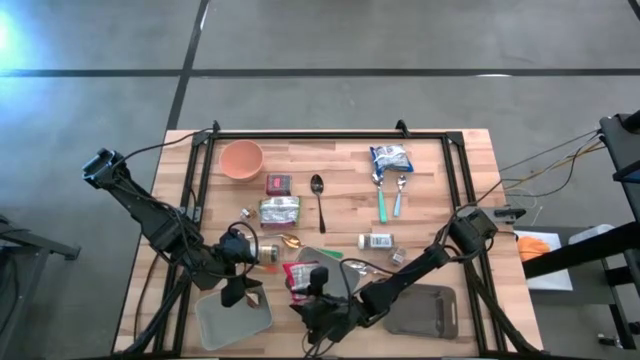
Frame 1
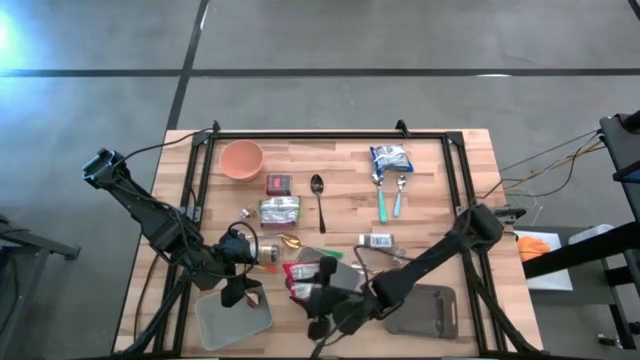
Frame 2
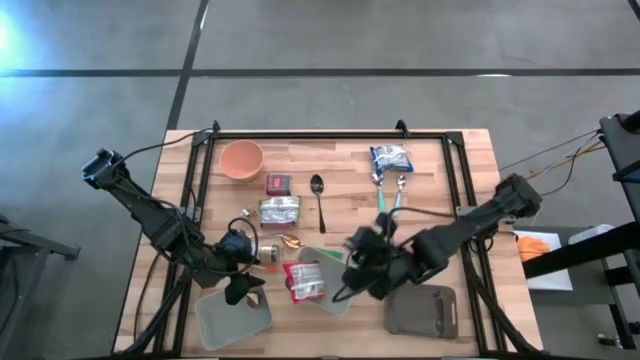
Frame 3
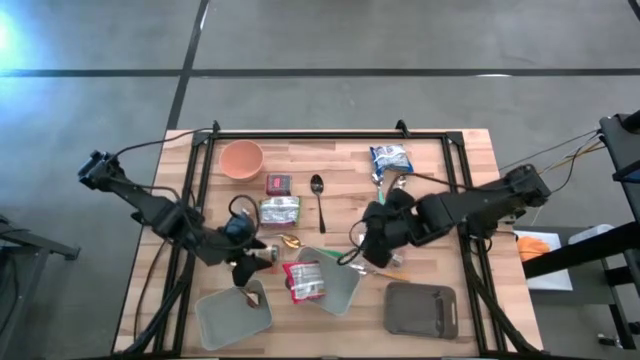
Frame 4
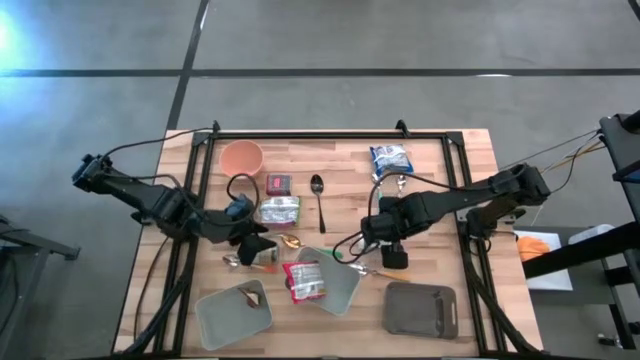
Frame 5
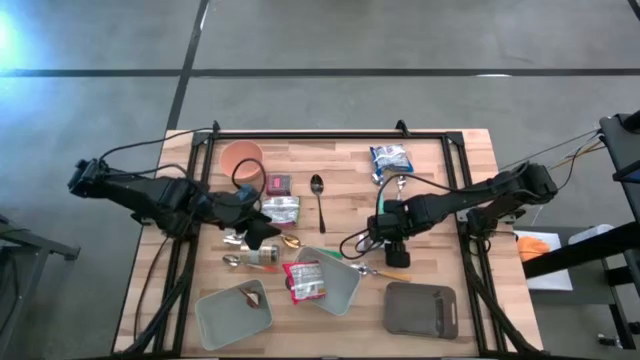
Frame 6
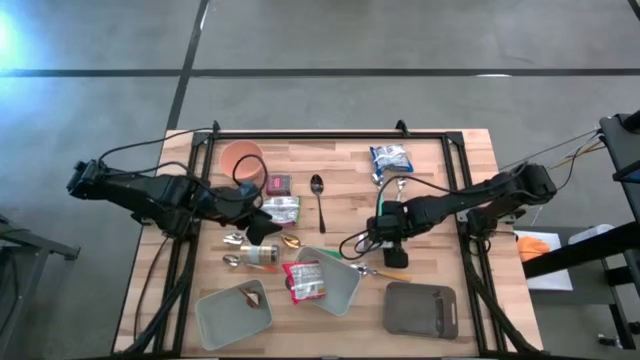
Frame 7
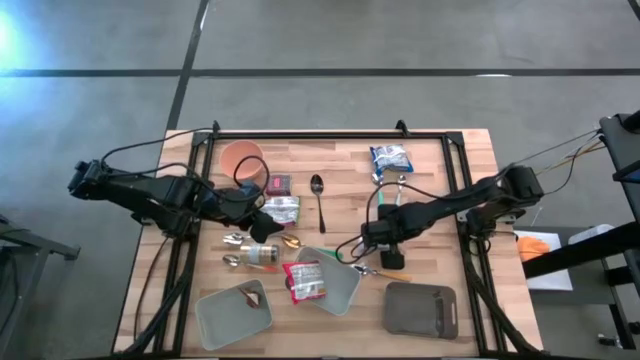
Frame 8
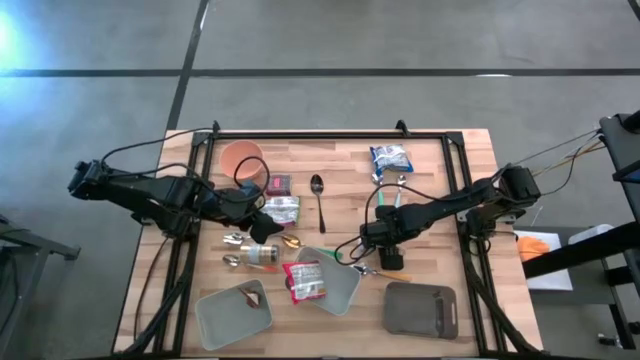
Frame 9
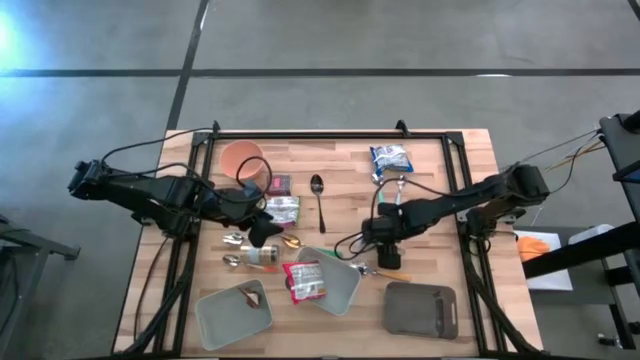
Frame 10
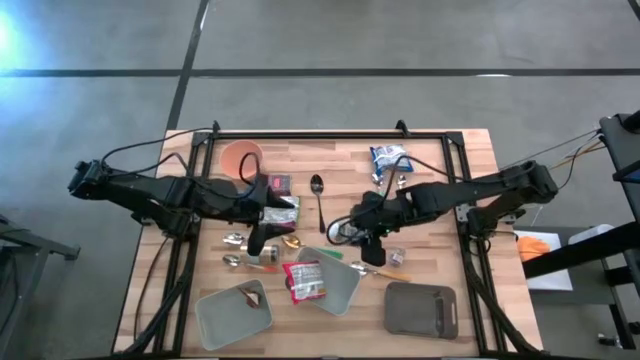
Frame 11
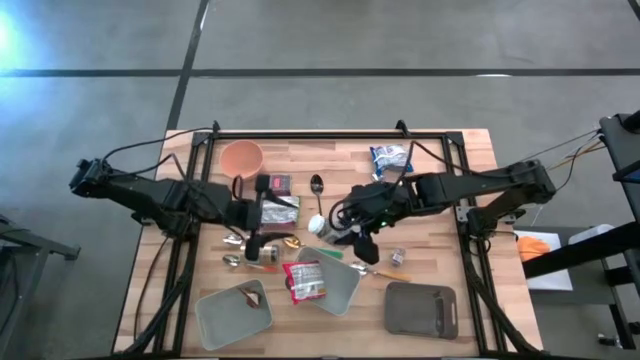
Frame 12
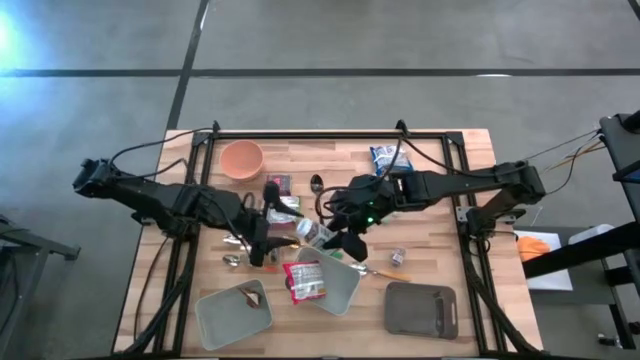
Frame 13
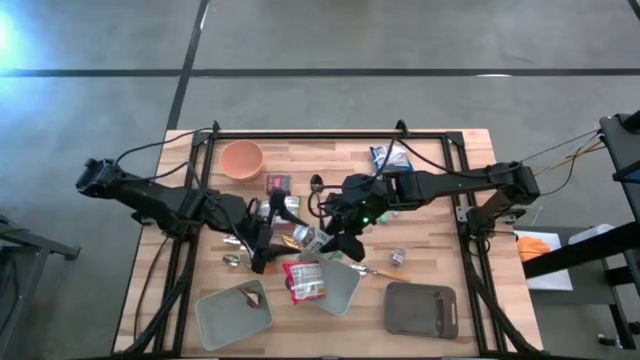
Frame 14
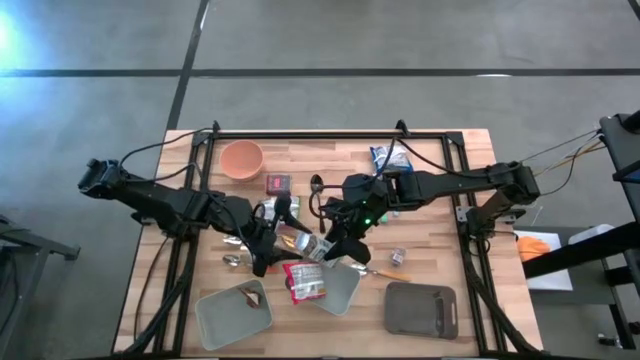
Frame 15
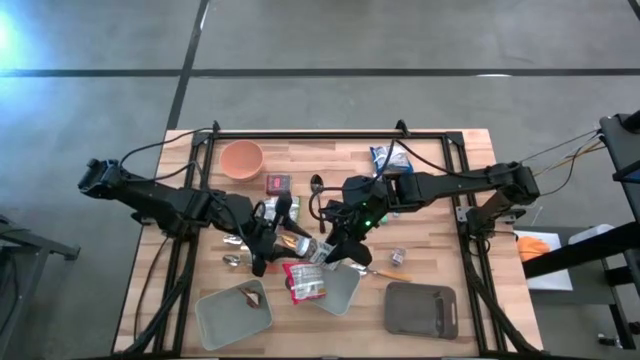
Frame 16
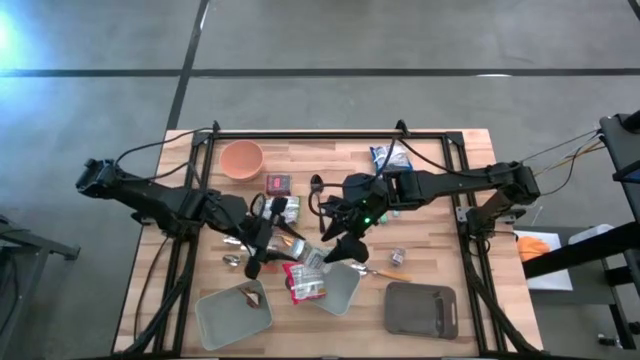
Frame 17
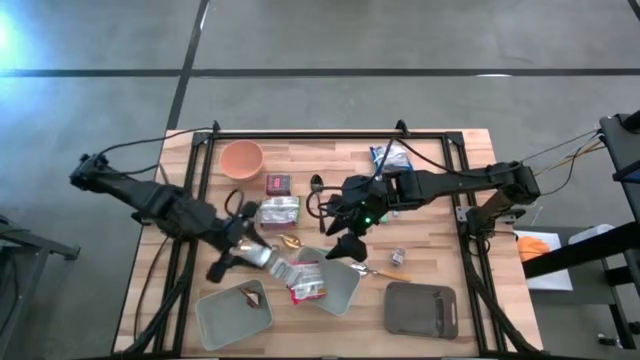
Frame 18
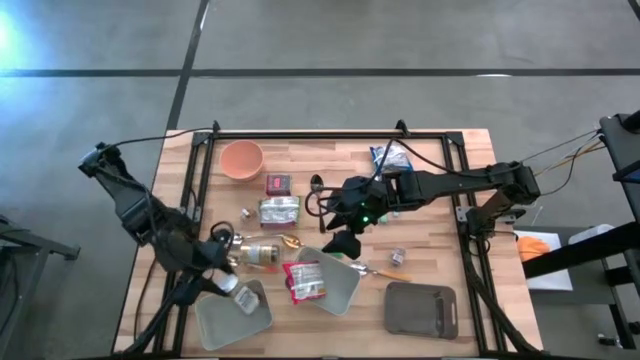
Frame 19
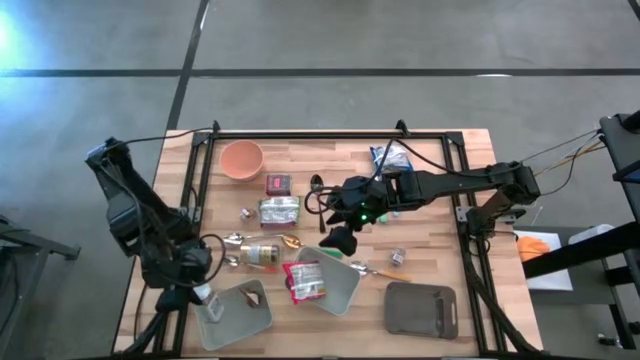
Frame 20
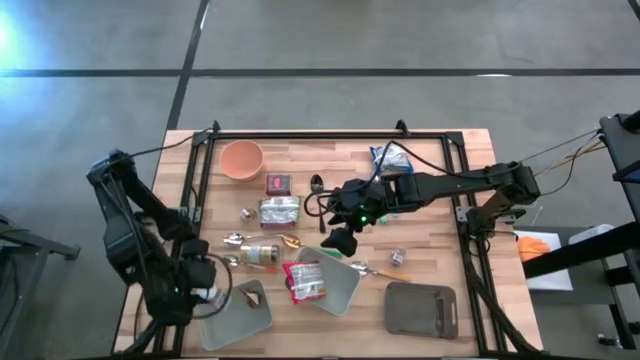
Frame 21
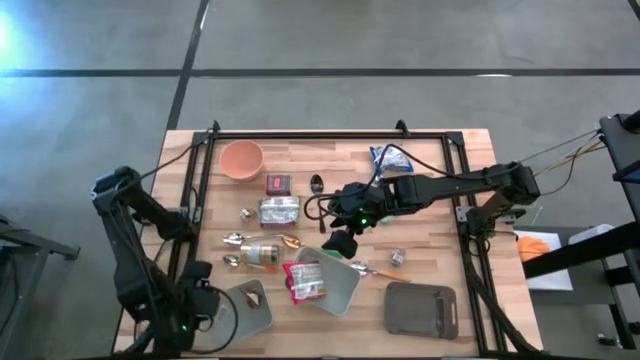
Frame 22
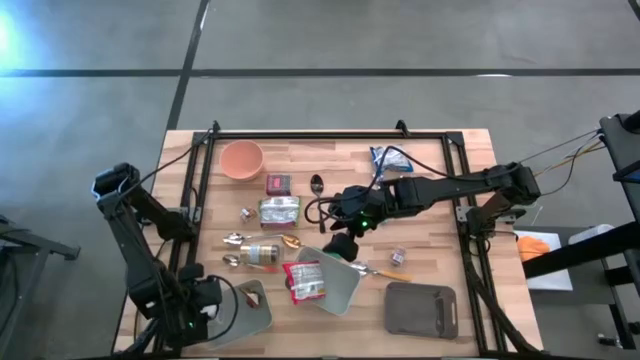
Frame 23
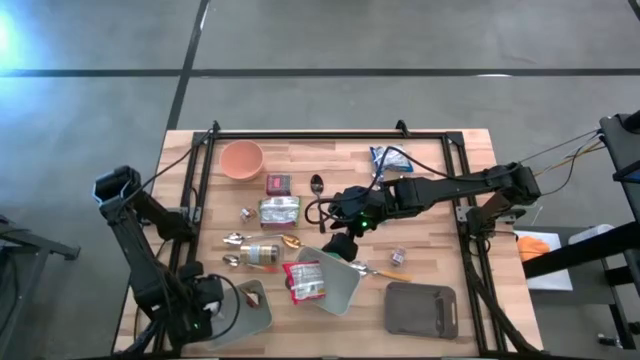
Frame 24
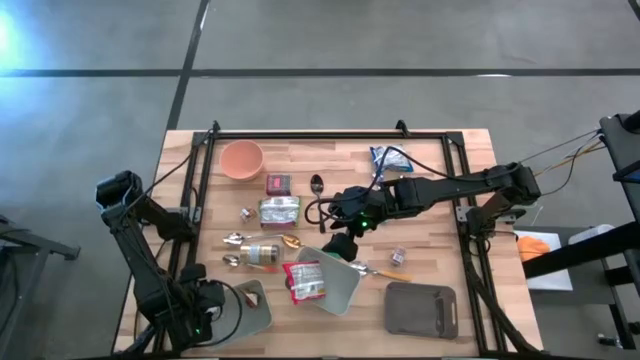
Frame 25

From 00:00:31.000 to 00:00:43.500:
Put the white seasoning bottle into the left gray bin

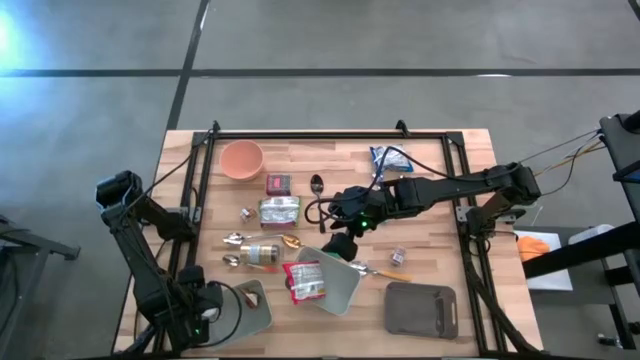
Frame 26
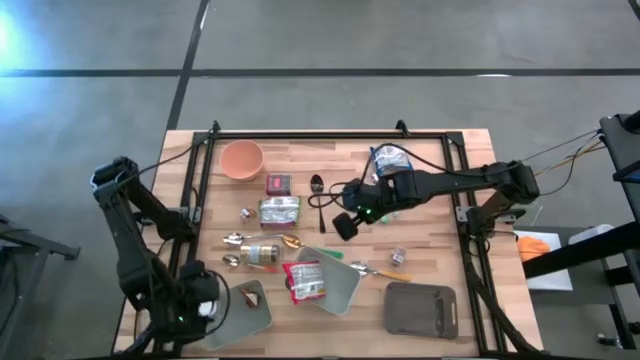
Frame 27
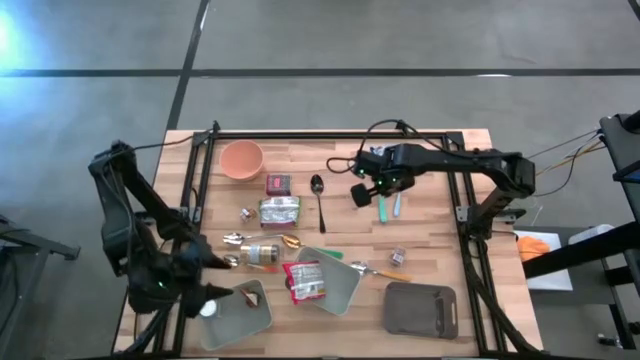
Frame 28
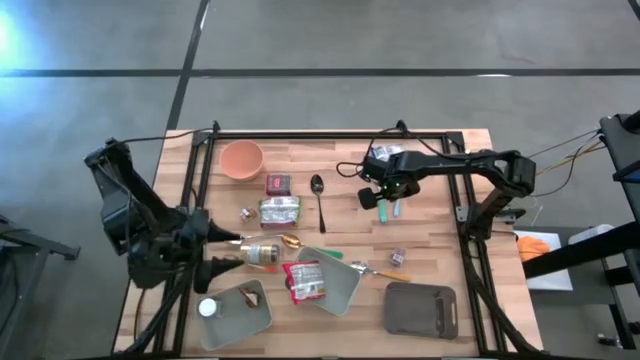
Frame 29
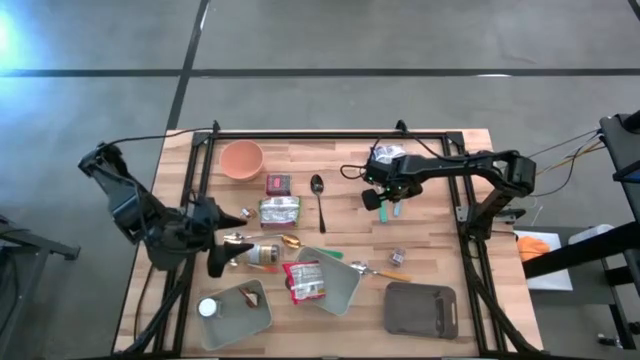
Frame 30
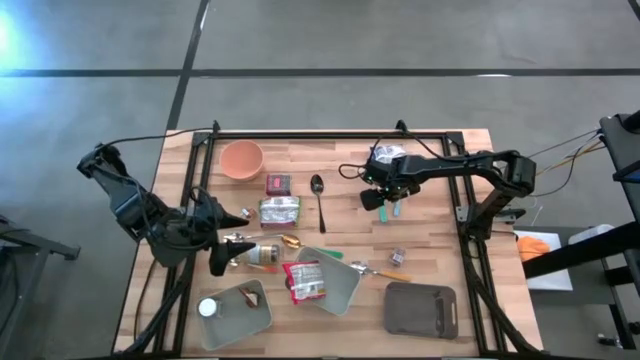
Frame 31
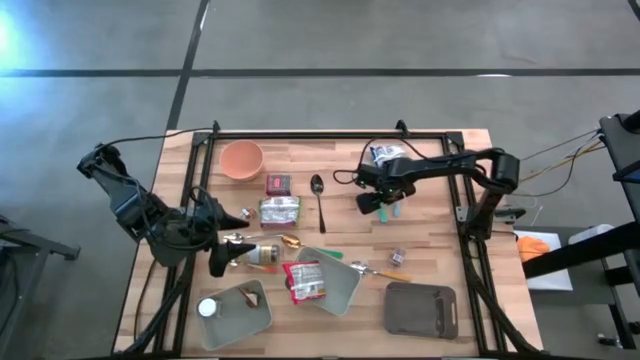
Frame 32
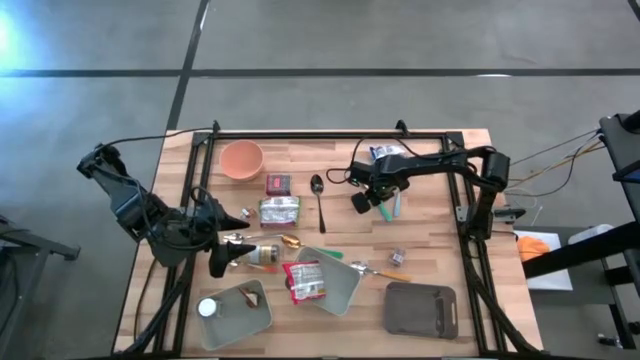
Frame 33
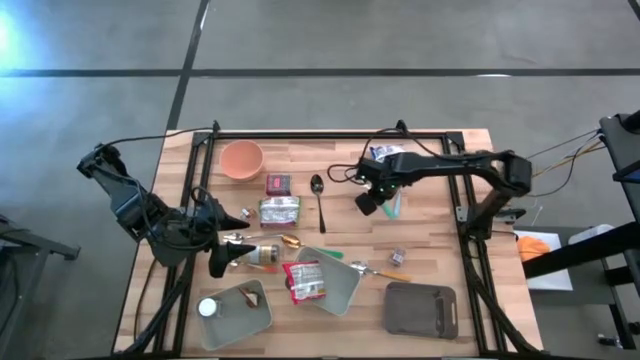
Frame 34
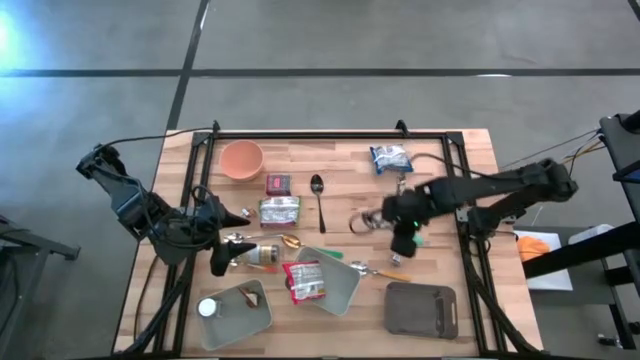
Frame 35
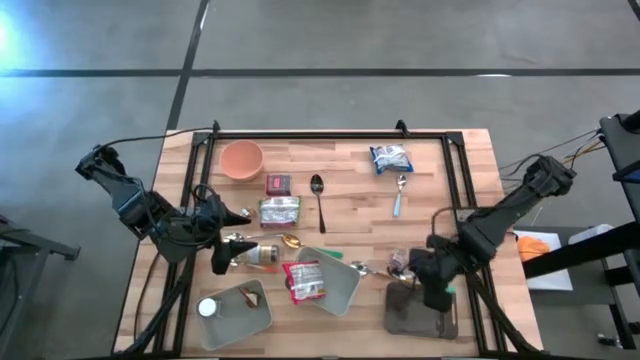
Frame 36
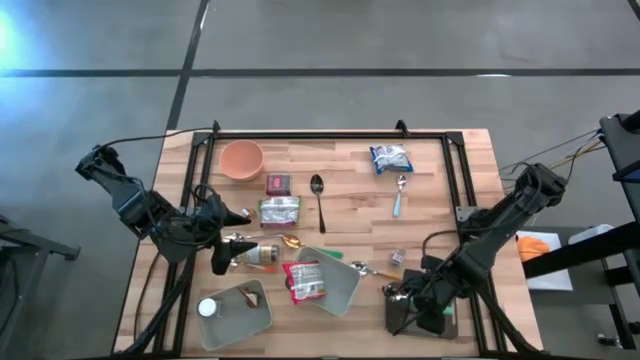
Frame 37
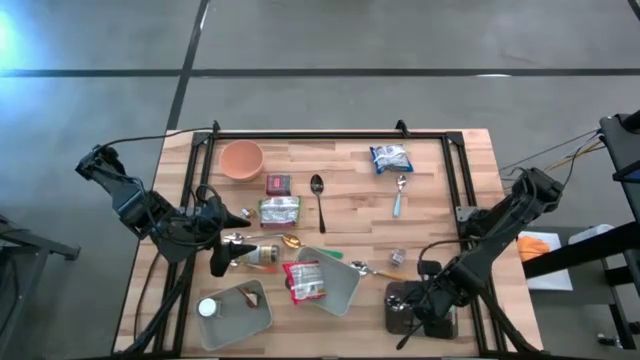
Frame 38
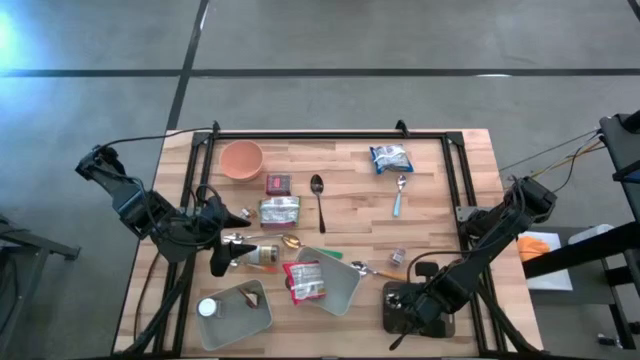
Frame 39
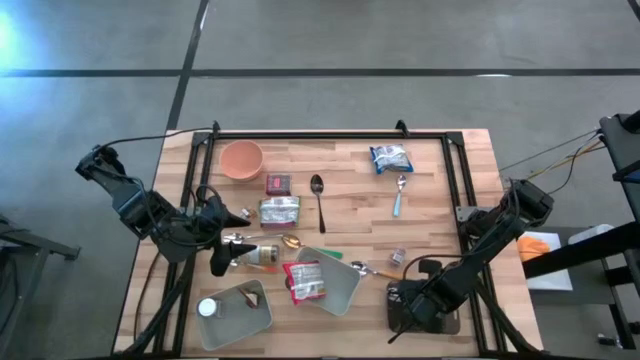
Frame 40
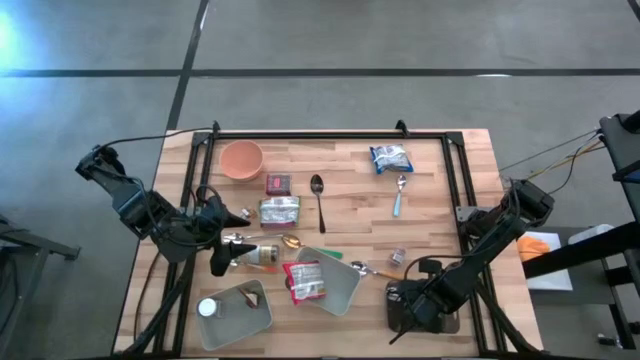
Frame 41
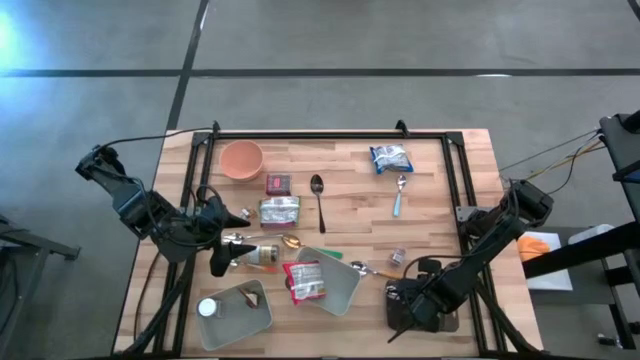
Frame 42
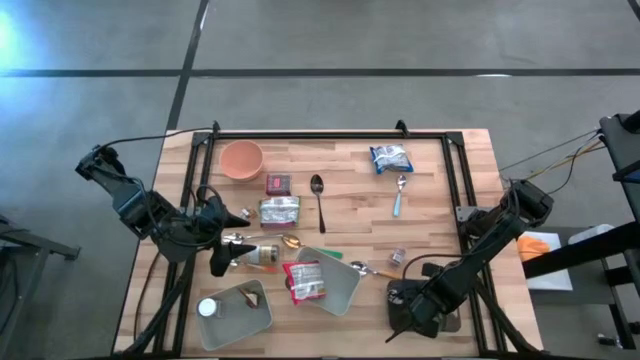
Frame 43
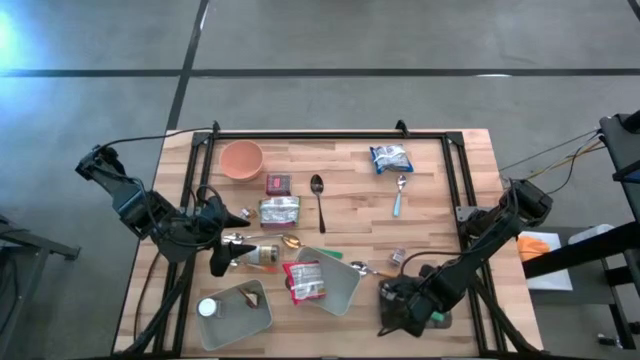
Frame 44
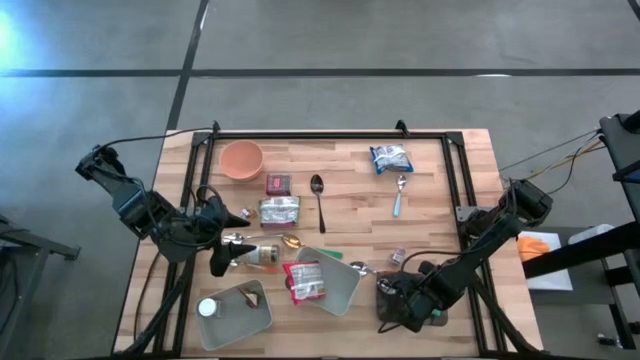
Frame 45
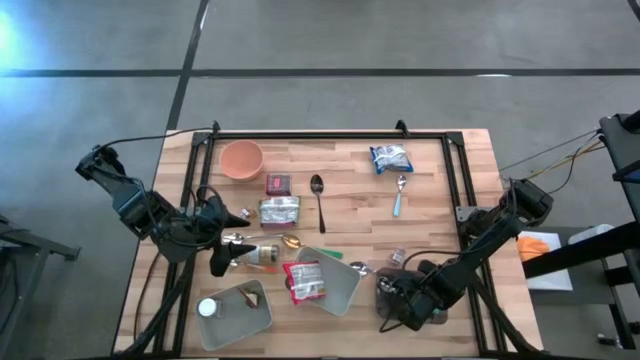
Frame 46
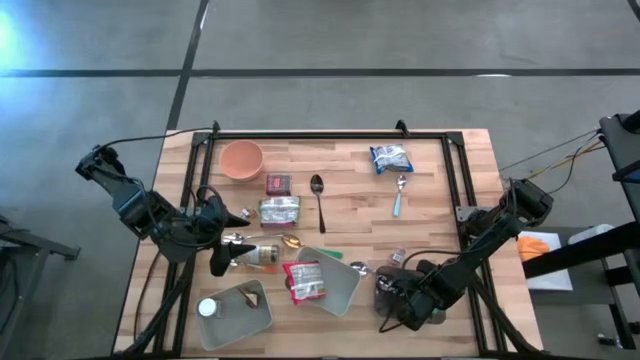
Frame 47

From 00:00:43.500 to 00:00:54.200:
Put the left light blue spoon into the black bin
